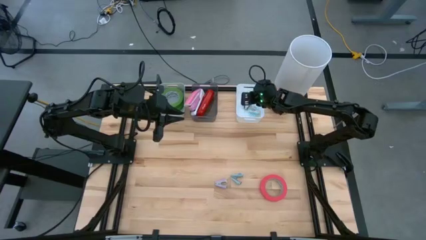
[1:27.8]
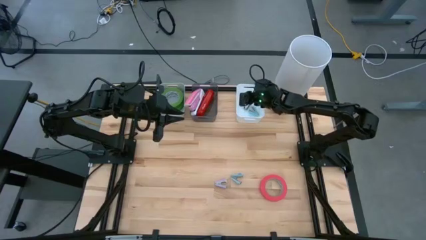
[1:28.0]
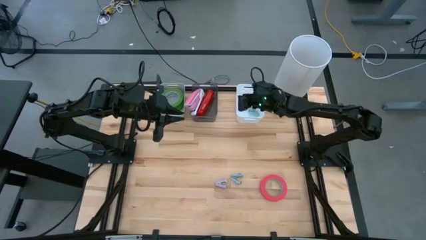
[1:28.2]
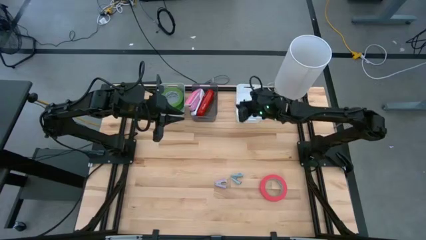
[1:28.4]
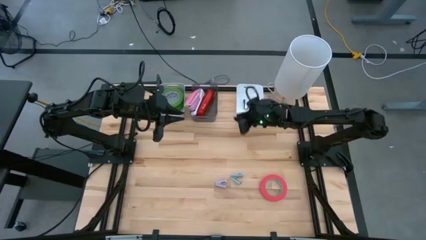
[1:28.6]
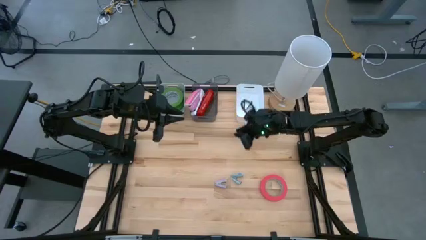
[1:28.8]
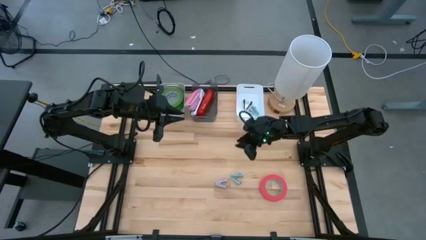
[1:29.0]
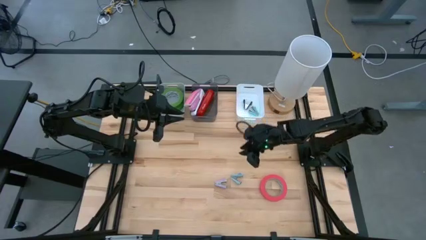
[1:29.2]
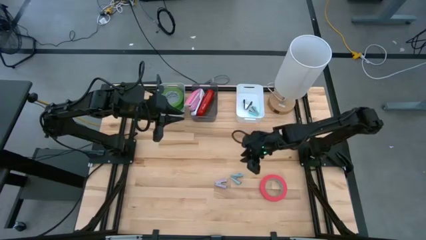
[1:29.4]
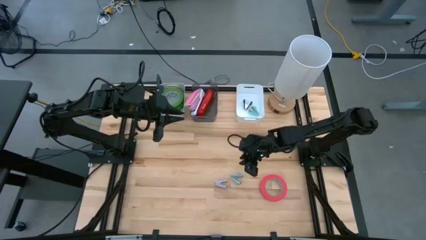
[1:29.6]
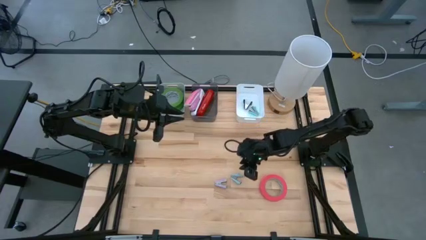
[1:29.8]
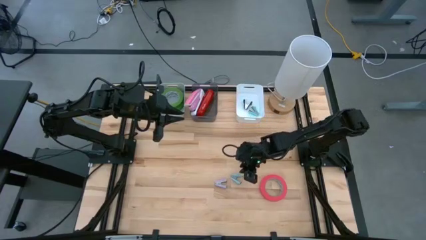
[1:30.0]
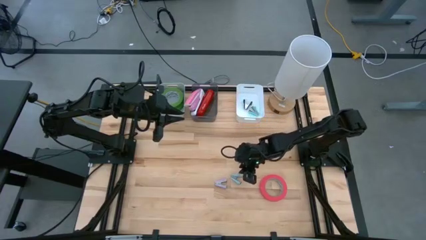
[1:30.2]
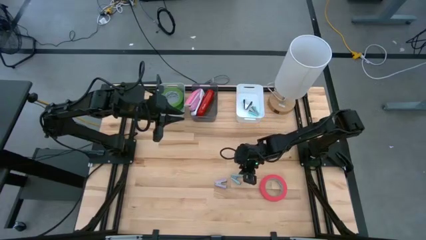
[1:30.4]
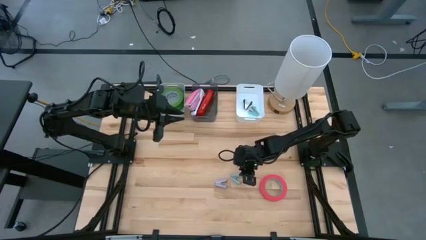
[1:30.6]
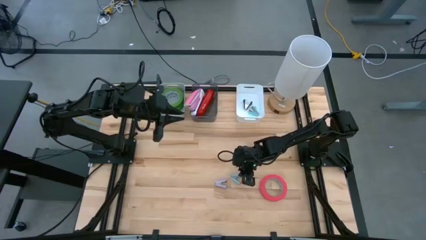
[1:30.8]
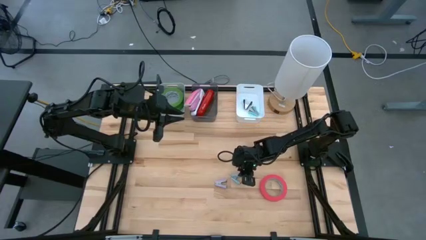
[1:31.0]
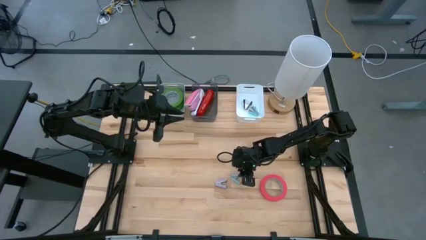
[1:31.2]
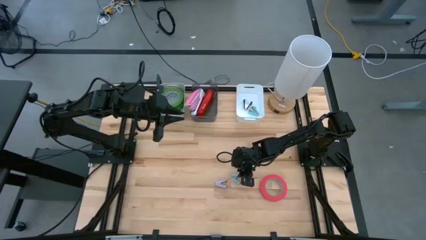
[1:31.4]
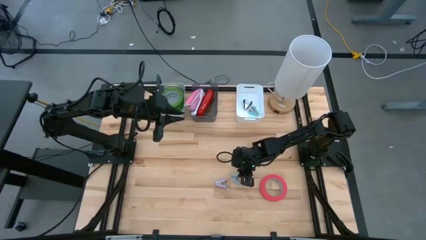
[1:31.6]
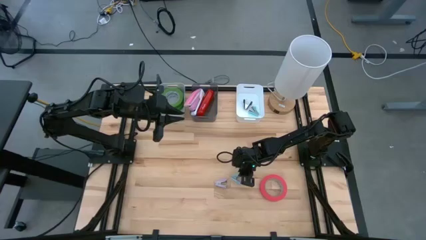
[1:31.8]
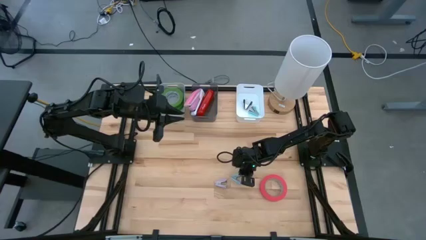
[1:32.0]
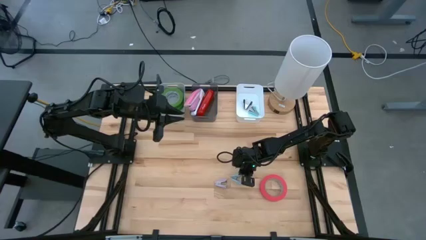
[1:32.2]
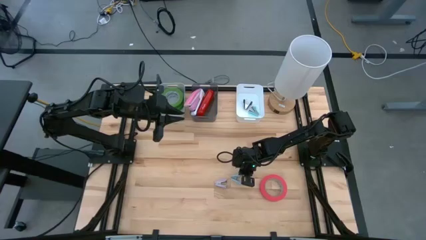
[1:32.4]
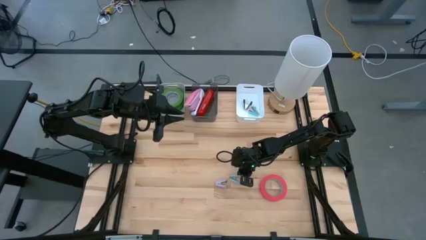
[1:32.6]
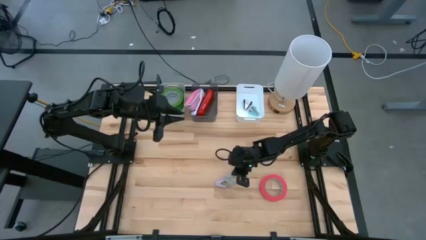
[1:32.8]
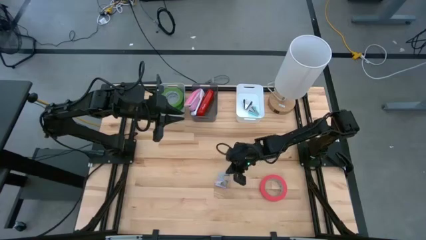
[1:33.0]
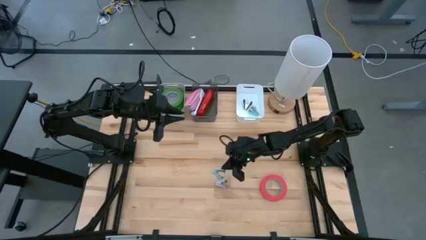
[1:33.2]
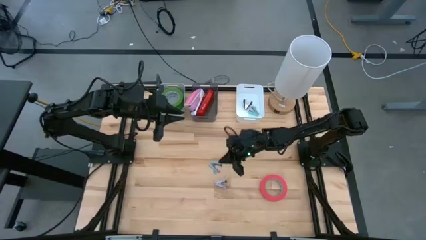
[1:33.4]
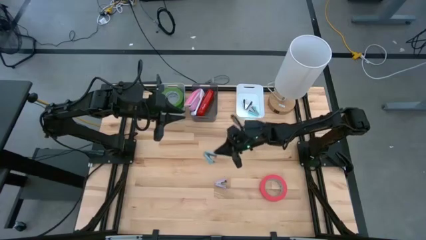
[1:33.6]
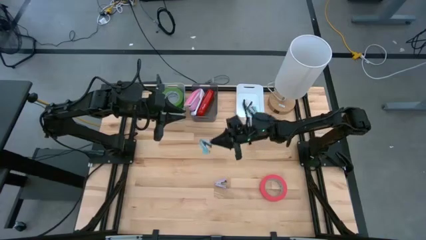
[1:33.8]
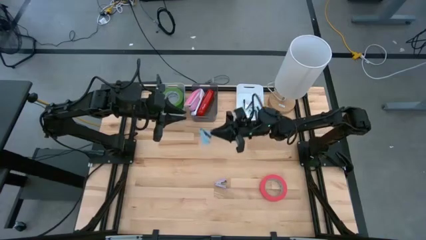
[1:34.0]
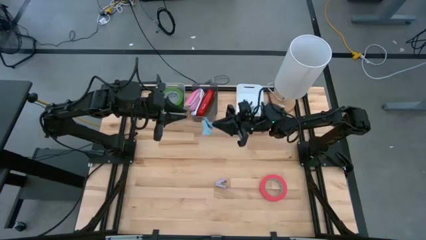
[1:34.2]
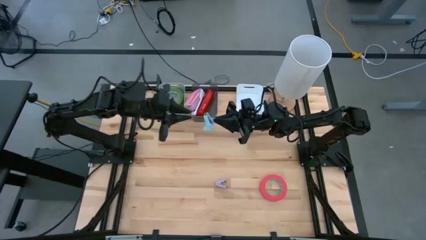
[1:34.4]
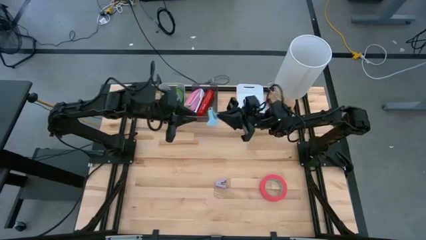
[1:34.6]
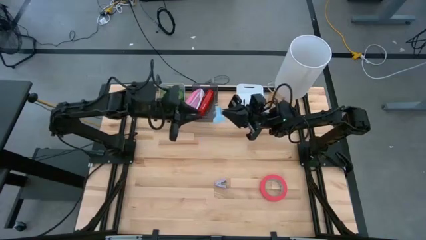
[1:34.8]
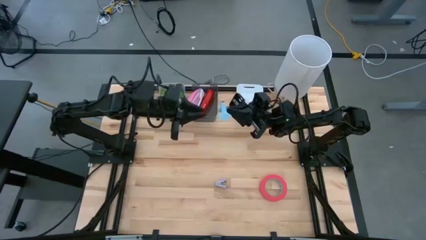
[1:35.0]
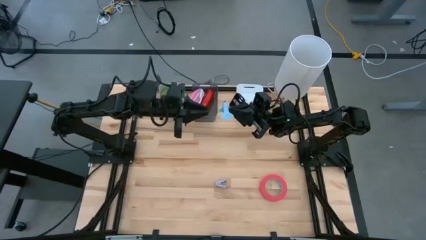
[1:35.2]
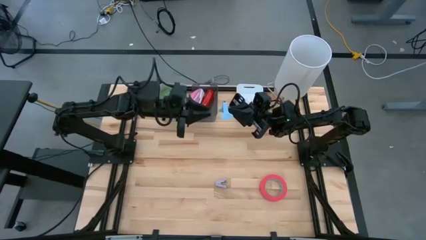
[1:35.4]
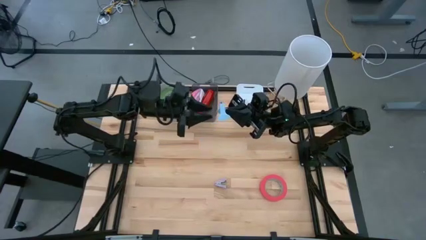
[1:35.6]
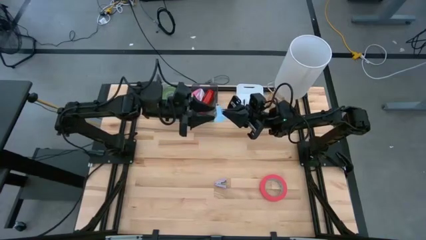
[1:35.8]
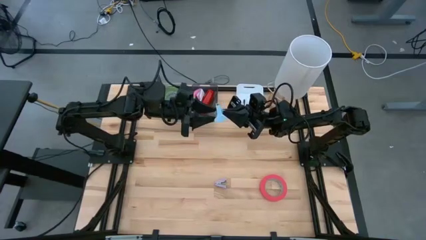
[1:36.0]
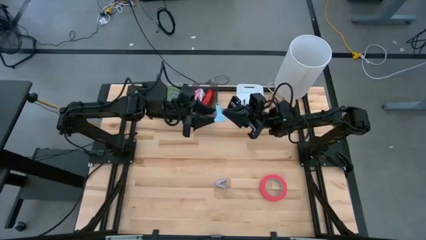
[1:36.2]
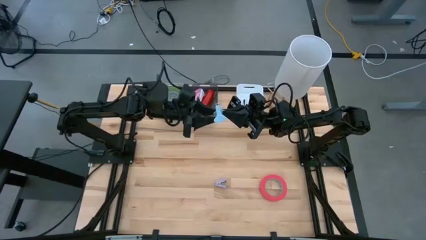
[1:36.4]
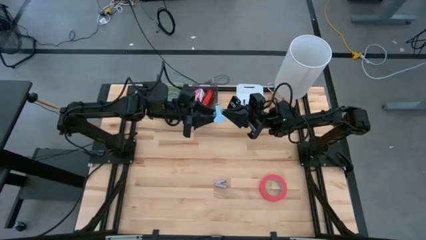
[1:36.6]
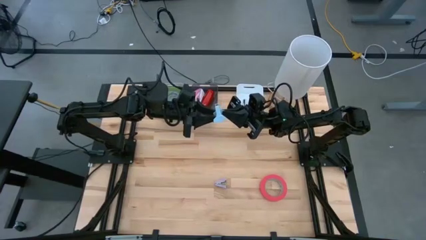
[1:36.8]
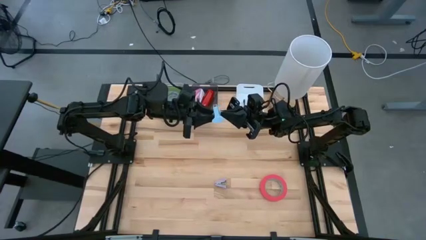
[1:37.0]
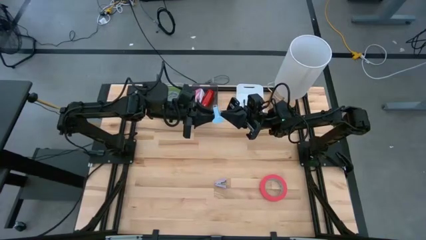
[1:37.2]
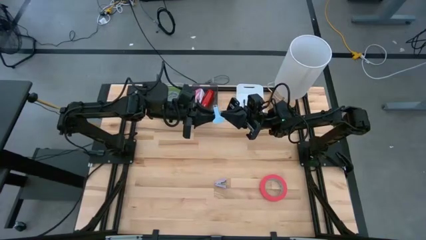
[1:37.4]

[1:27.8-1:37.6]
Task: Pick and place Stapler, Stapler remover, tape
Put the light blue staple remover into the white bin
